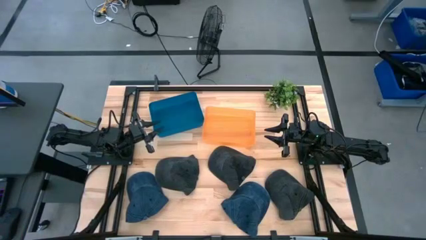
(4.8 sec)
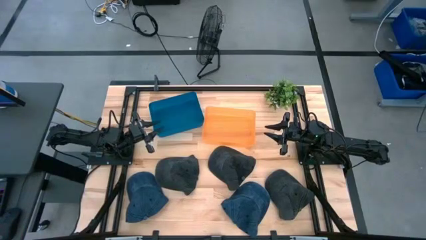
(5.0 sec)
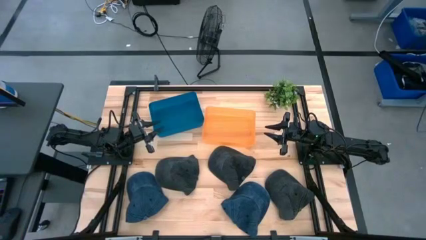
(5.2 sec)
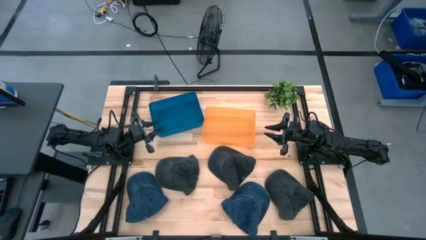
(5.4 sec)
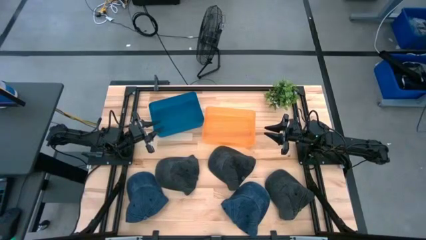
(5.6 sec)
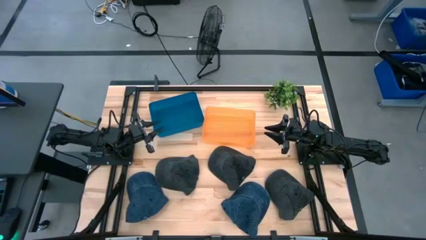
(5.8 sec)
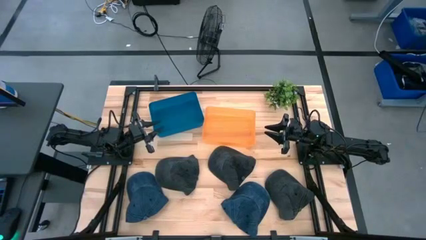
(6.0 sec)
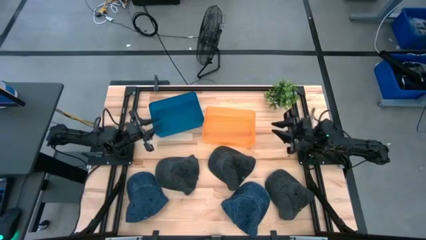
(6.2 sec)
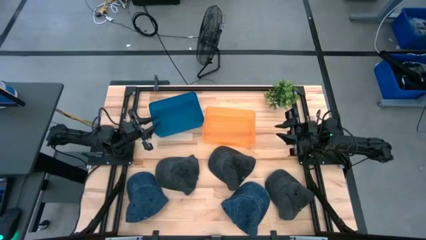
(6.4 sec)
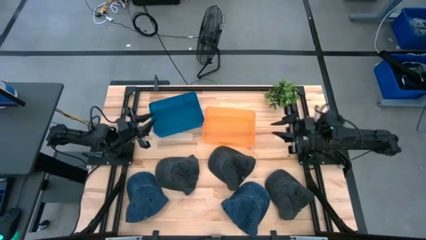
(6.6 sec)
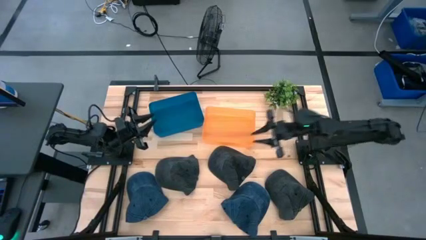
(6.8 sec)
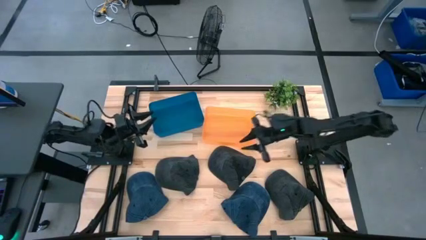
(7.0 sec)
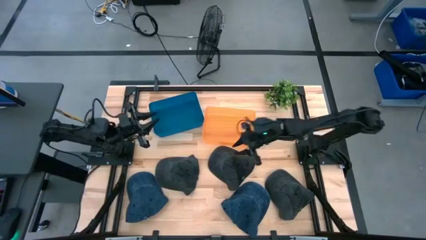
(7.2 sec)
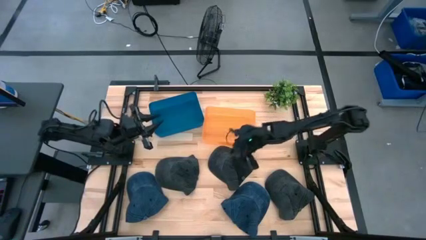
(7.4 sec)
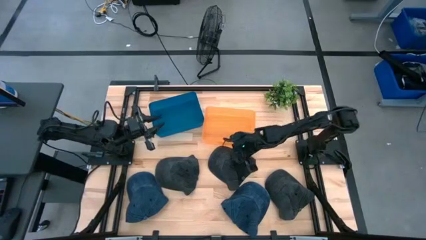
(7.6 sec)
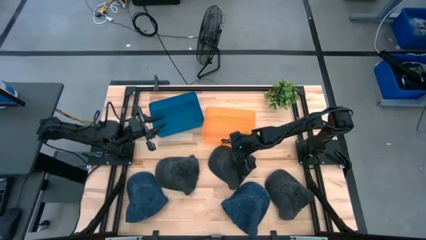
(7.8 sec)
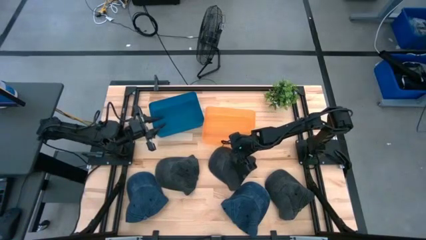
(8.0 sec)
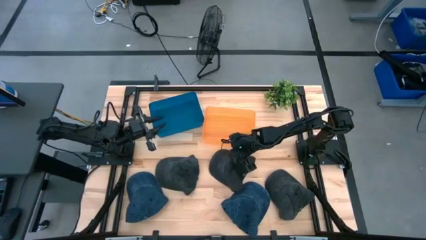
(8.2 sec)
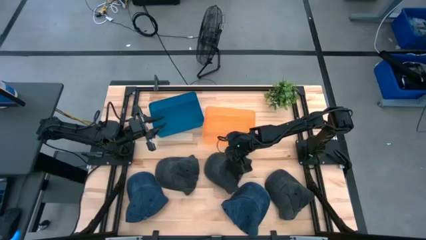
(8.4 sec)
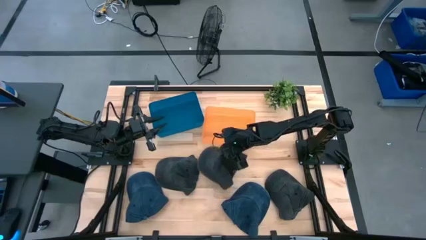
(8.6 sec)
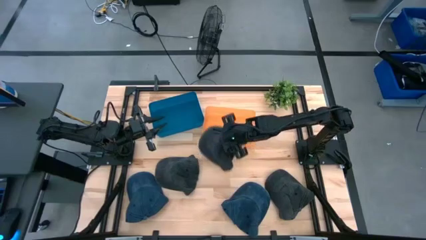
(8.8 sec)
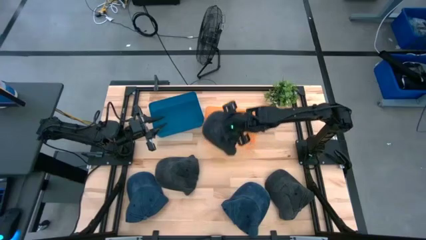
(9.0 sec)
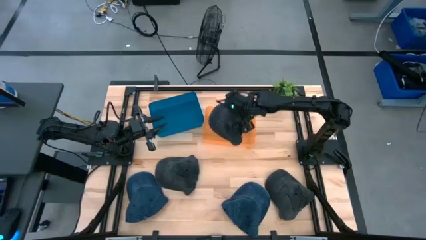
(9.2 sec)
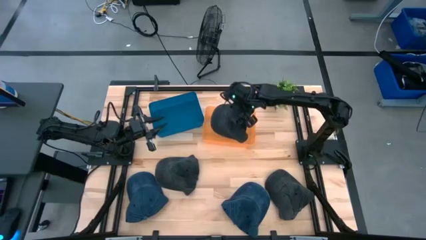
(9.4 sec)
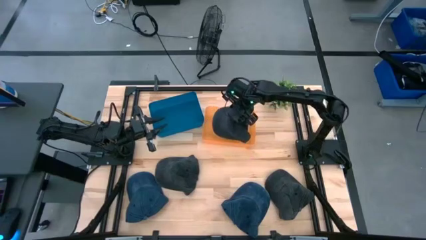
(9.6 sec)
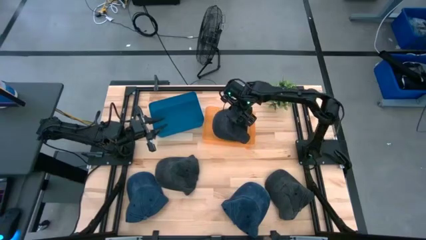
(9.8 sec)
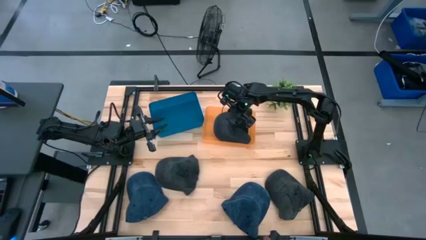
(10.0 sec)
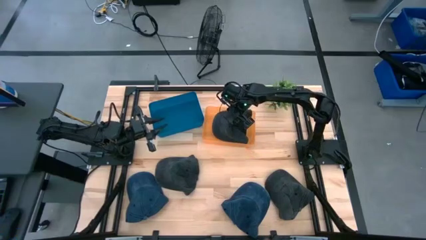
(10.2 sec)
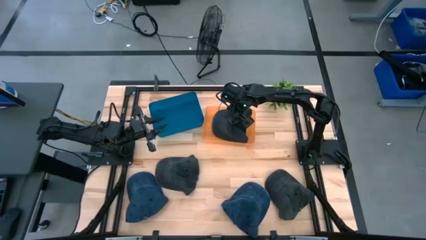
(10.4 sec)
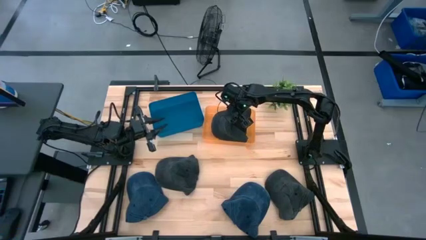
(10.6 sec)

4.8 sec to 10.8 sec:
Task: Pick & Place hat
Put the middle black cap into the orange bin

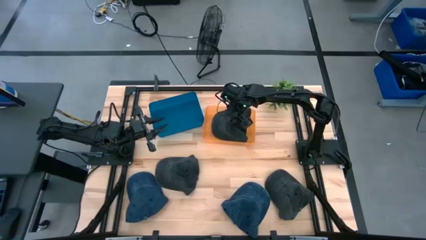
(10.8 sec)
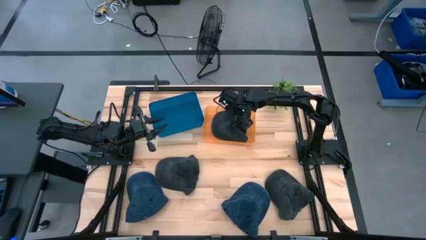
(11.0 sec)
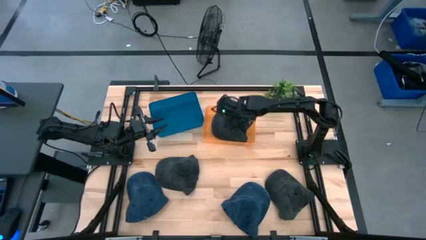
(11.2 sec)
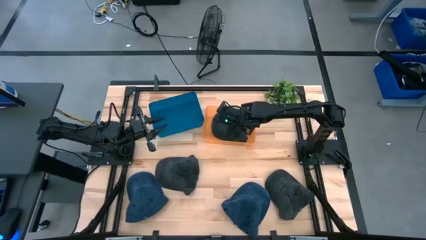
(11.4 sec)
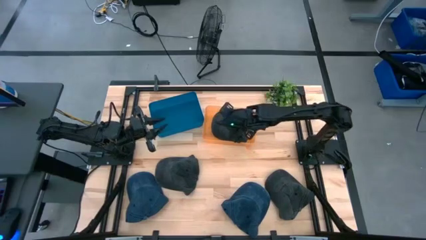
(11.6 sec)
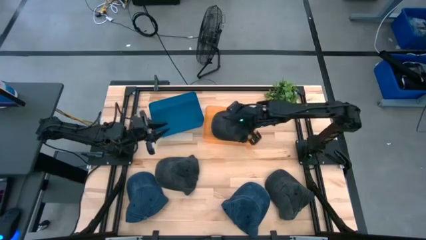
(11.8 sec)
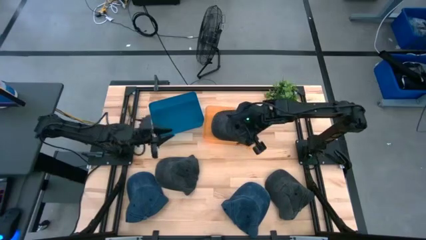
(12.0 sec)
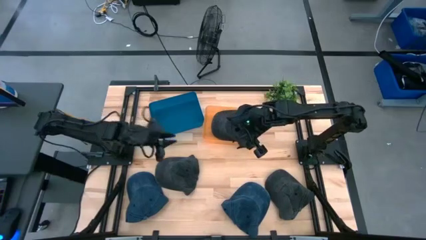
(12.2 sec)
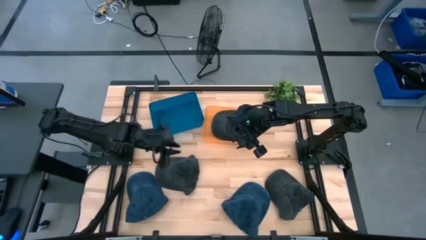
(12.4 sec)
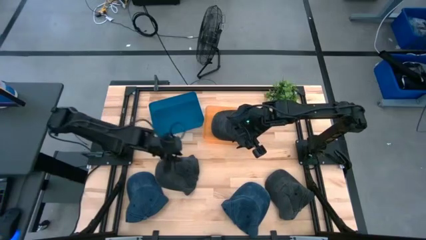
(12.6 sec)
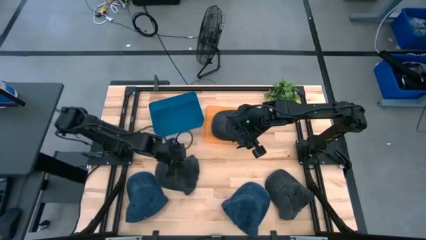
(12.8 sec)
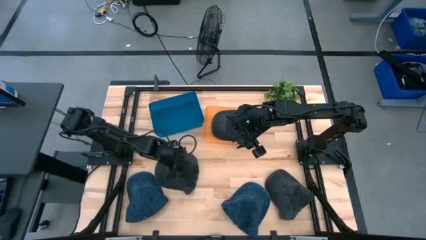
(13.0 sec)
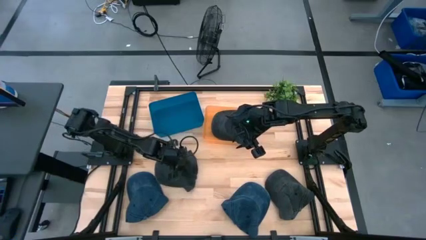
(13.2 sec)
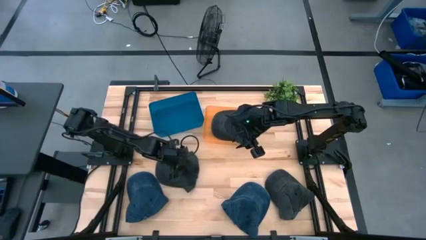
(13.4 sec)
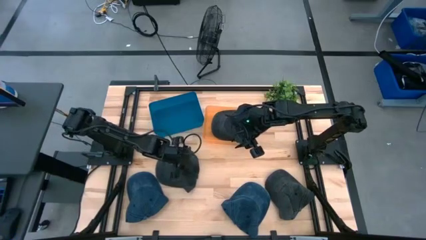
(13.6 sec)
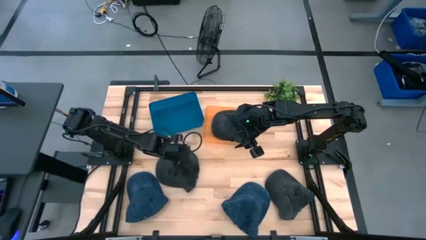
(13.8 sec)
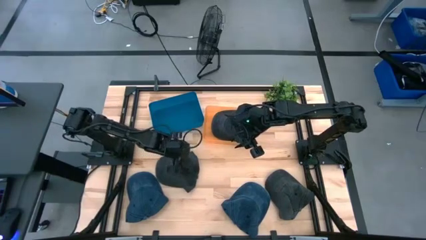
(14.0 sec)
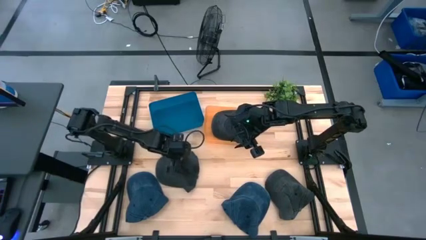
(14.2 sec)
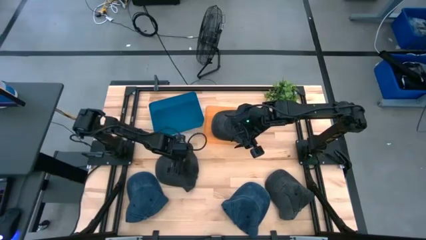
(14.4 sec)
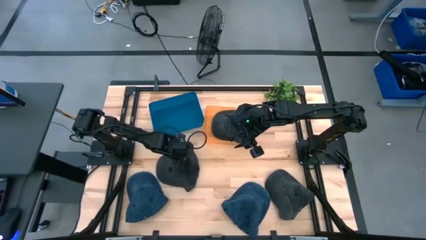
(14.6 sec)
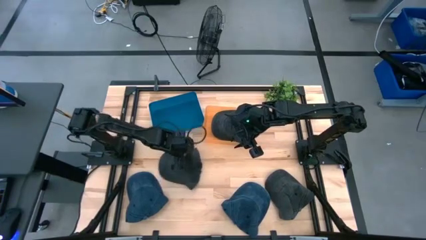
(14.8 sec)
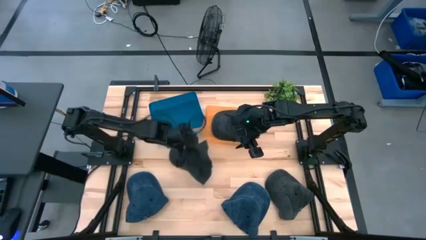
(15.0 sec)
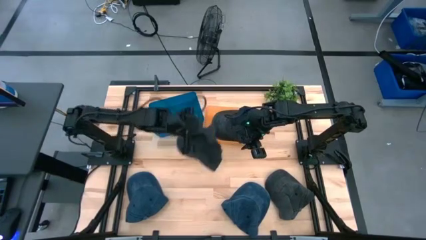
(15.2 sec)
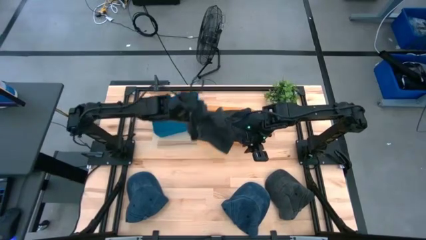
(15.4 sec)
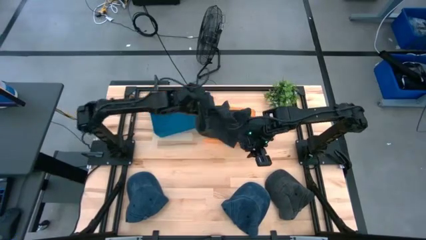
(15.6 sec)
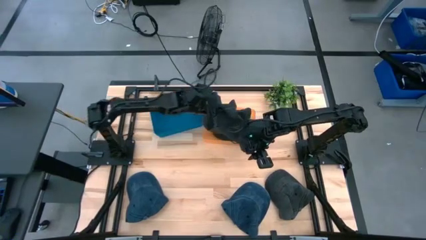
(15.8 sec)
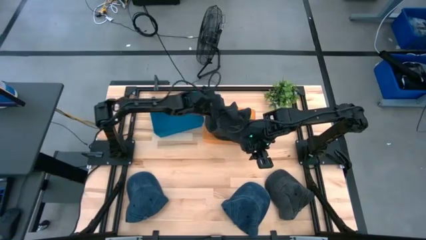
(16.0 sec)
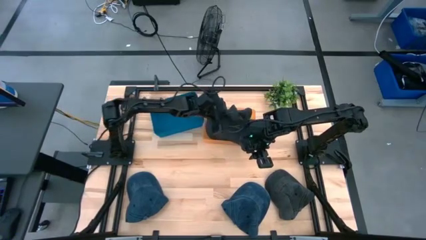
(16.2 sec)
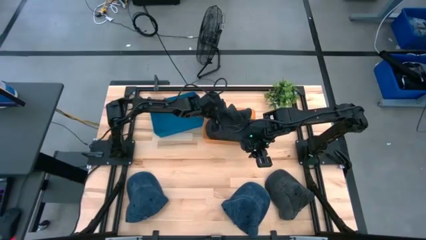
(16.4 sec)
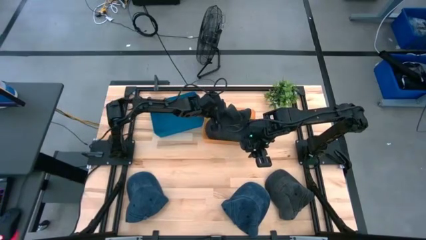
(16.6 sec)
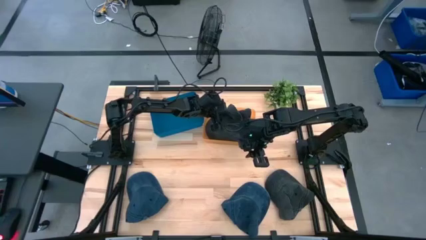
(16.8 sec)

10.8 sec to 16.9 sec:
Put the left black cap into the orange bin

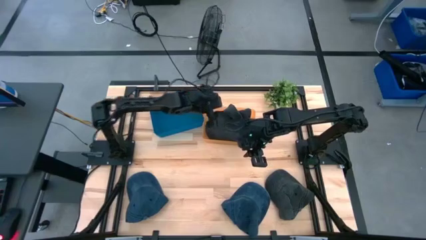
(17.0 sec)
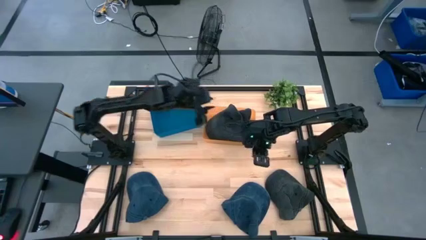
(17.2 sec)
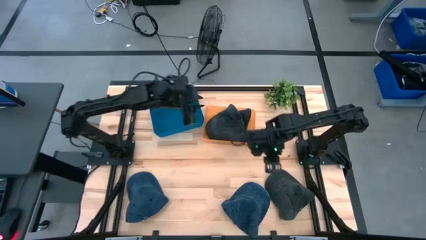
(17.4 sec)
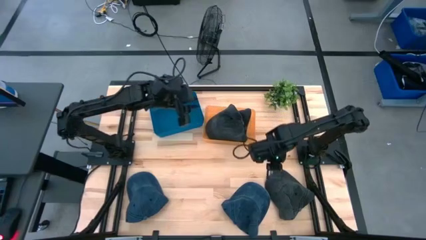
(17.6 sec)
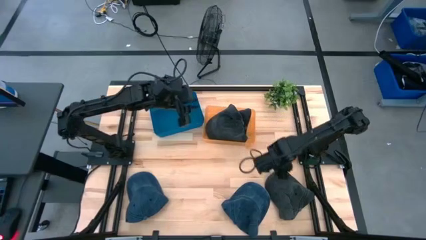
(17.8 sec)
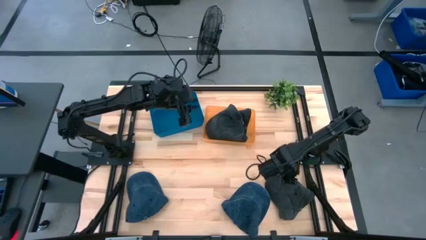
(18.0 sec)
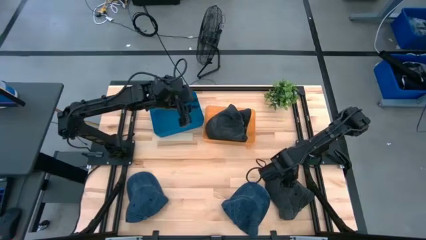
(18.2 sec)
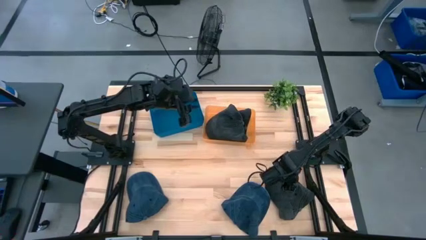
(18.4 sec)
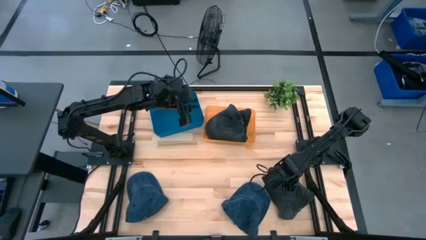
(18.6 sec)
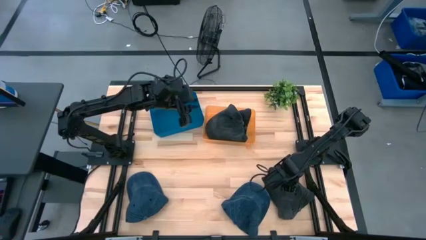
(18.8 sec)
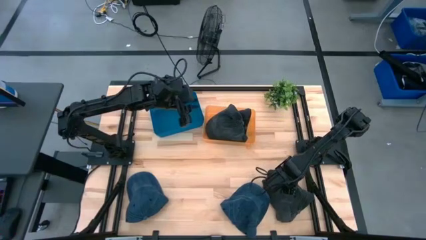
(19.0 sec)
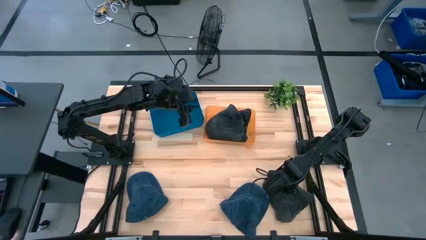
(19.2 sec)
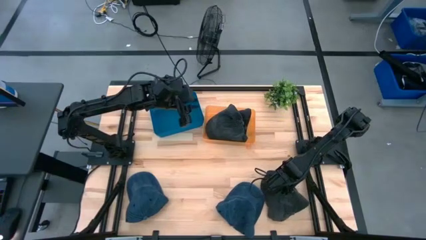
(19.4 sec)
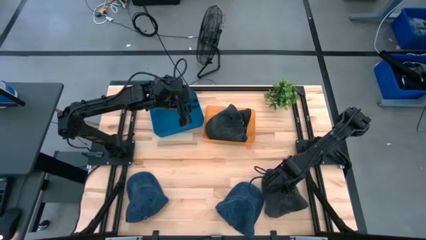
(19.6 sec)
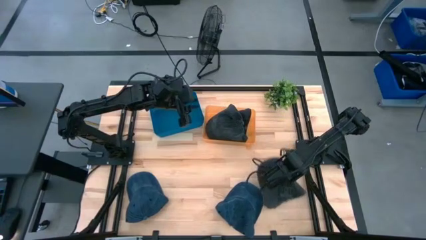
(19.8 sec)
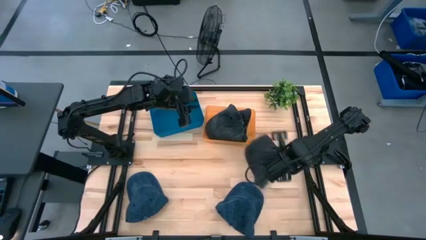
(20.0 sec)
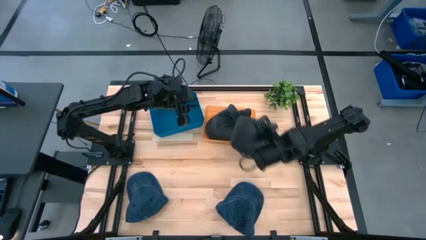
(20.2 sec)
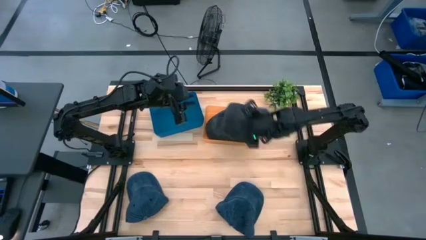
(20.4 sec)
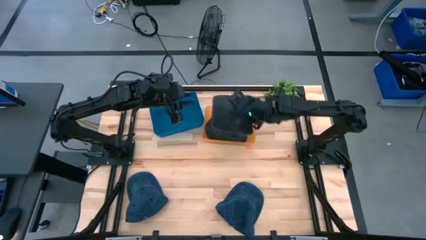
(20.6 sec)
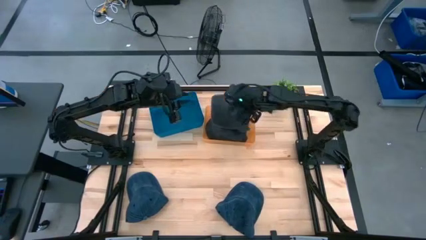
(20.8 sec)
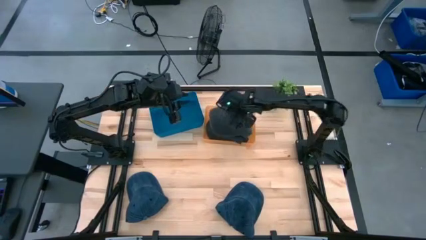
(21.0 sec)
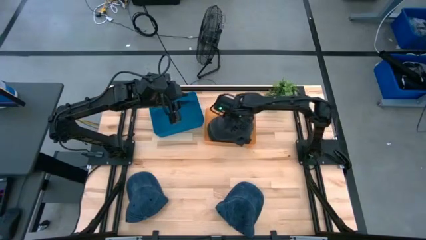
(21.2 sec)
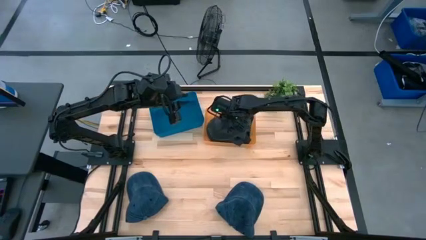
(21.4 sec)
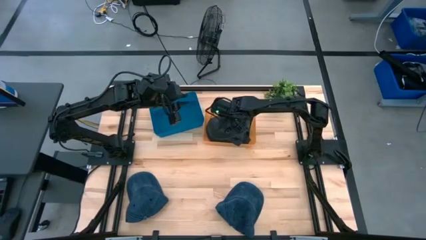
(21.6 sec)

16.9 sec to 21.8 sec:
Put the black cap into the orange bin
